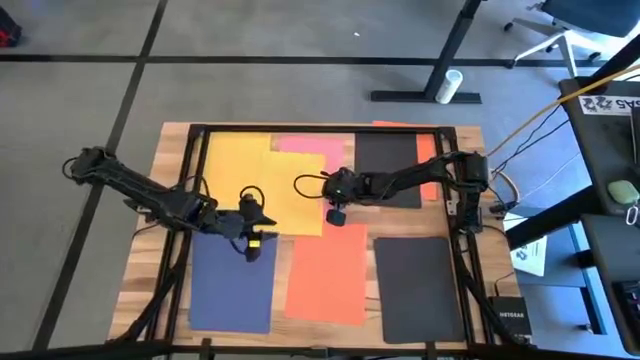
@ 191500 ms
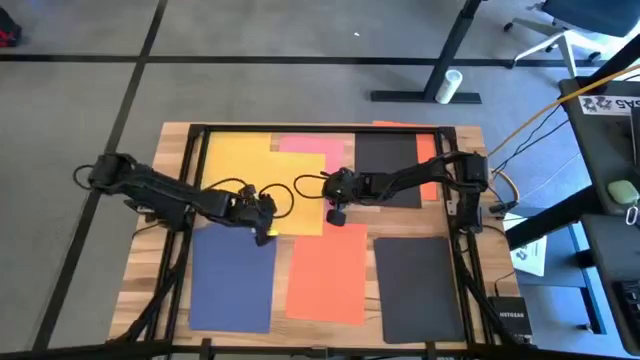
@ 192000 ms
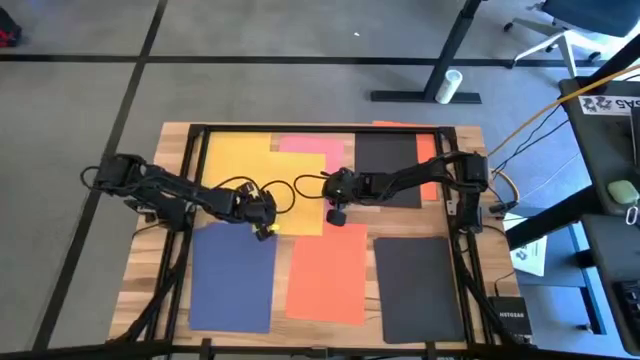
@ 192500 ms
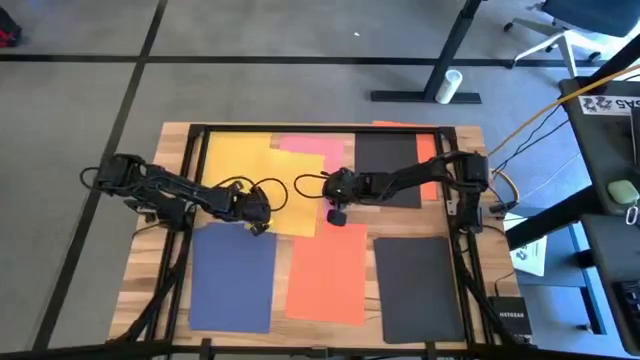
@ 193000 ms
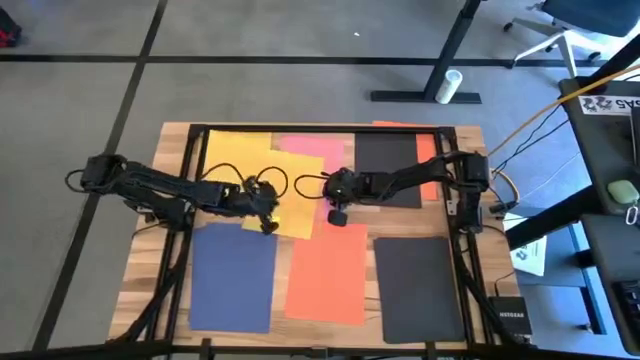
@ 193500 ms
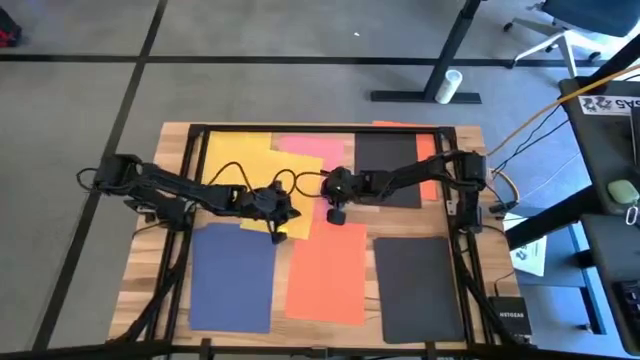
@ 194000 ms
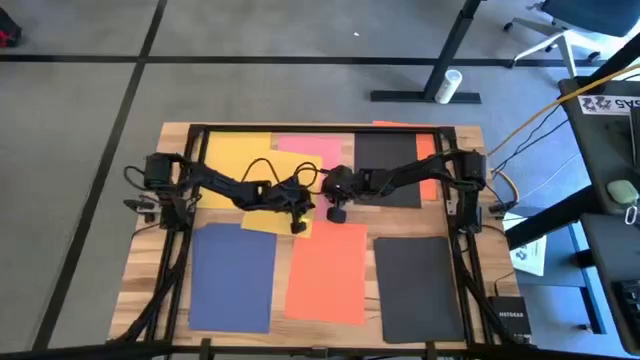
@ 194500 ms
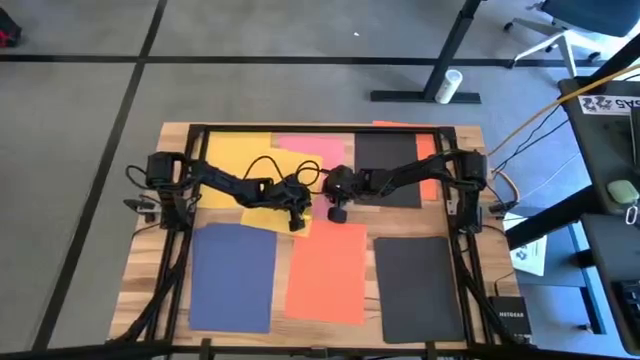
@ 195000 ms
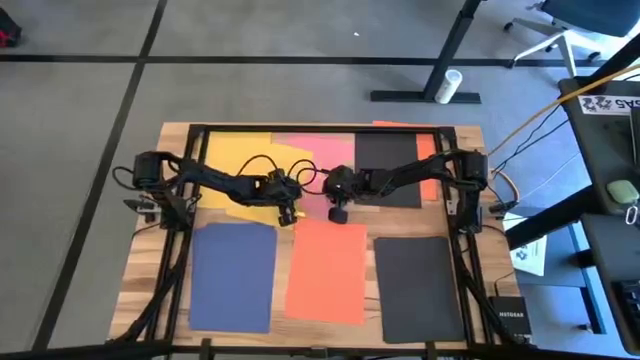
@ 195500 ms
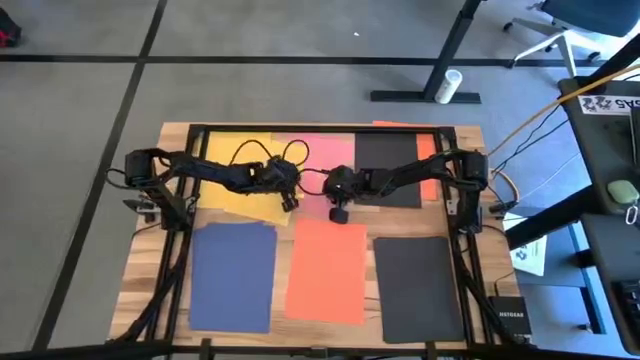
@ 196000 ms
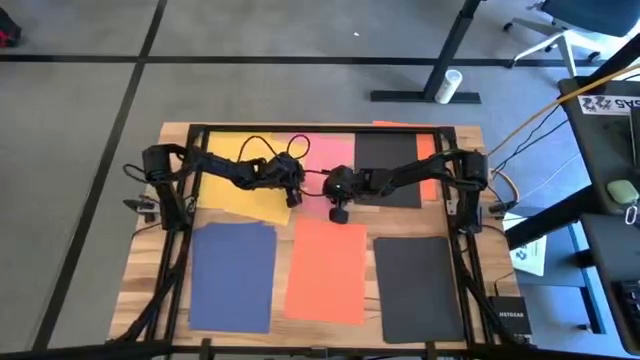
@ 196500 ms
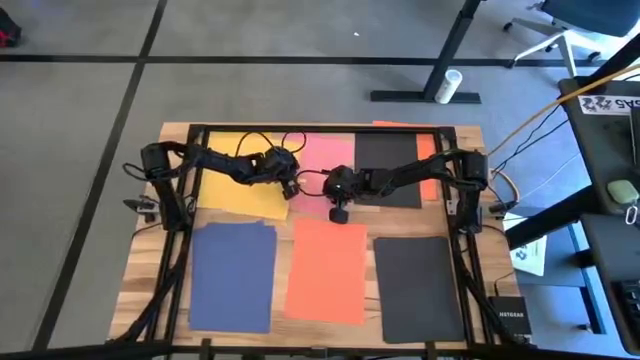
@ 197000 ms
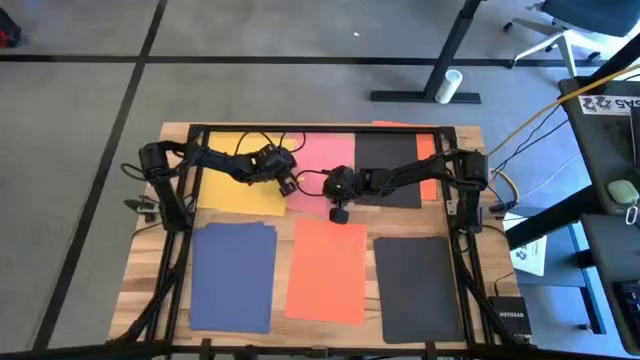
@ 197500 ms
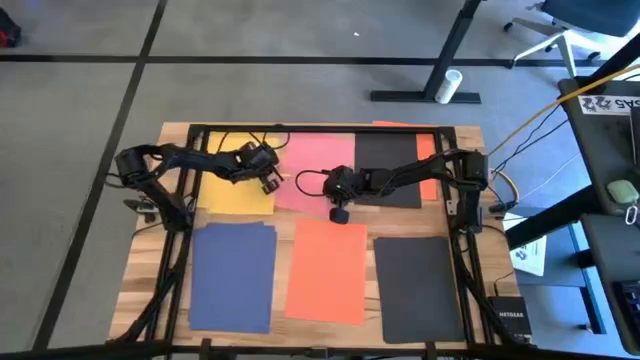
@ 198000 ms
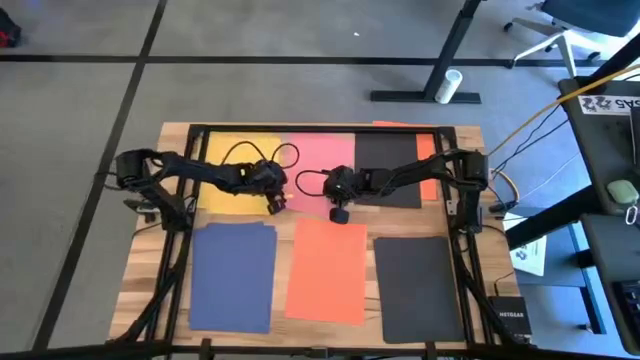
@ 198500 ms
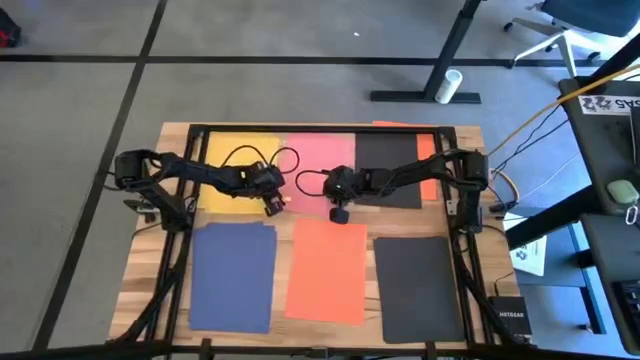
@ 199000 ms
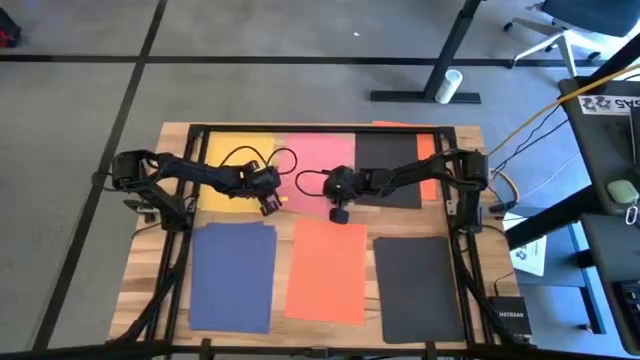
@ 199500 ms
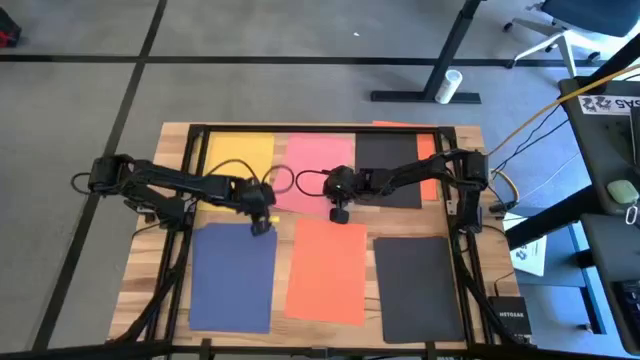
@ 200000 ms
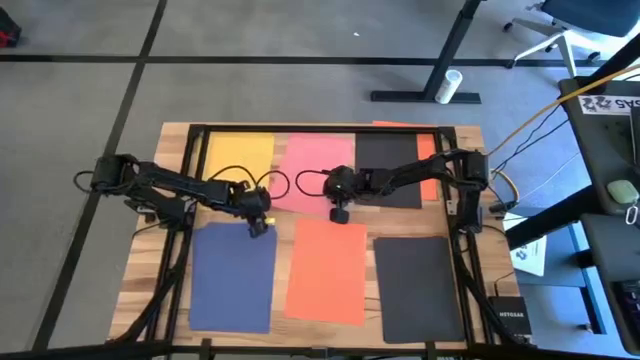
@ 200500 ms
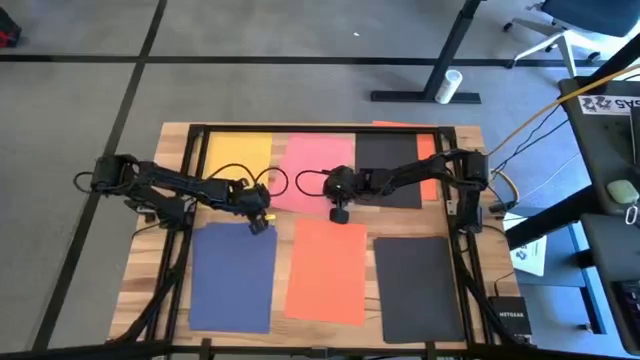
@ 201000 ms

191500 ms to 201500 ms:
Task: Organize paper
Stack the yellow paper on top of the stacked yellow papers

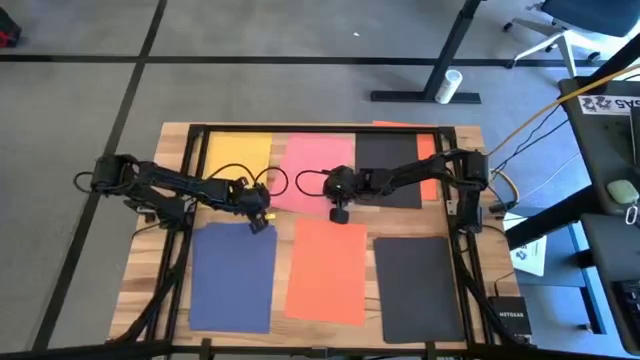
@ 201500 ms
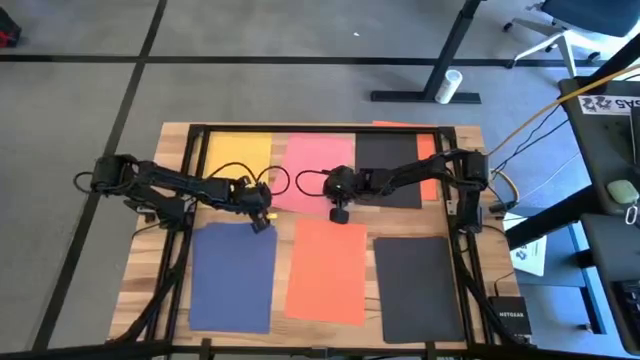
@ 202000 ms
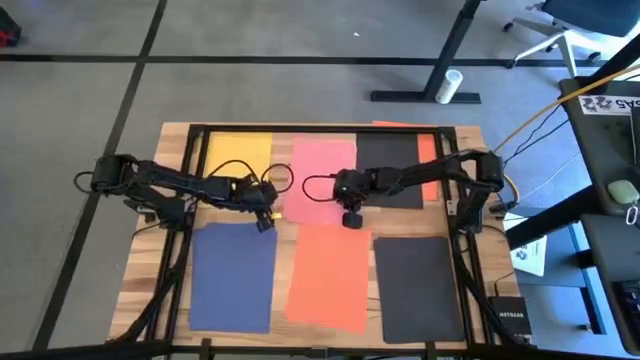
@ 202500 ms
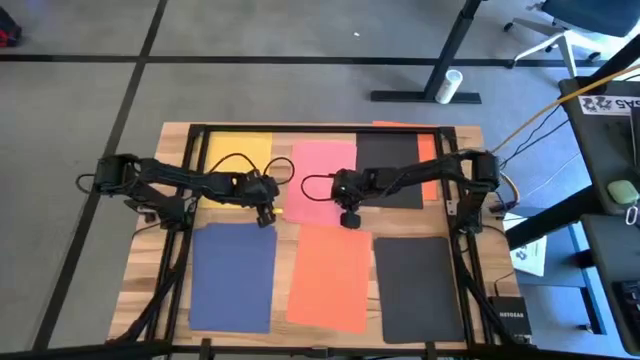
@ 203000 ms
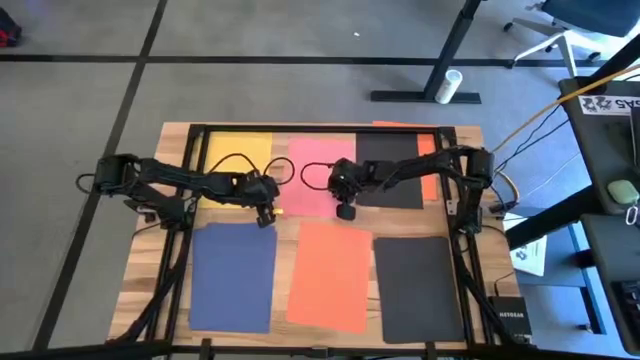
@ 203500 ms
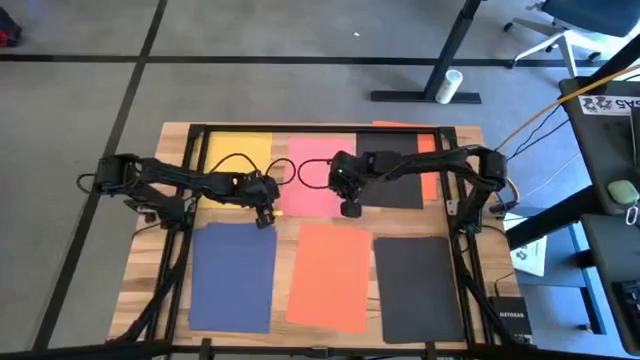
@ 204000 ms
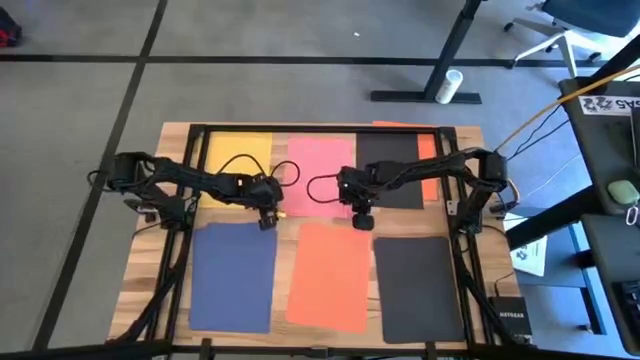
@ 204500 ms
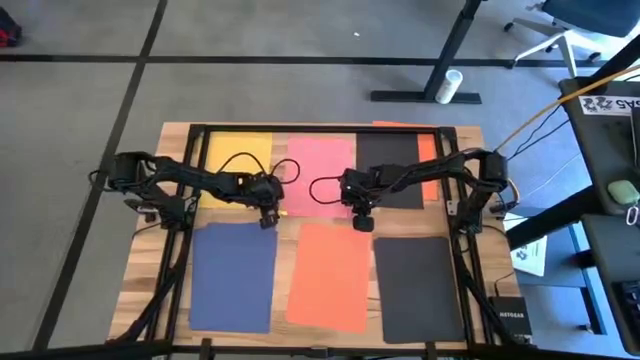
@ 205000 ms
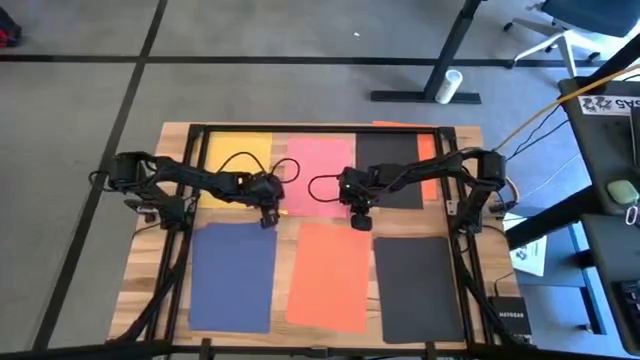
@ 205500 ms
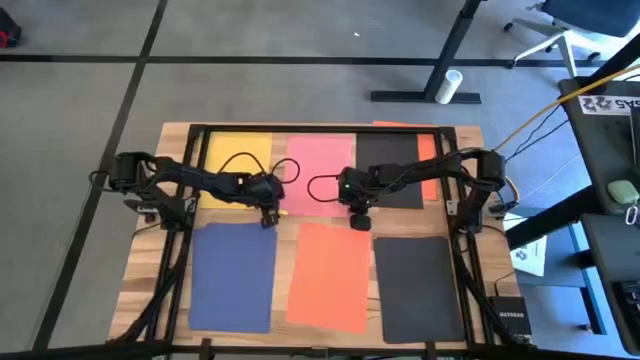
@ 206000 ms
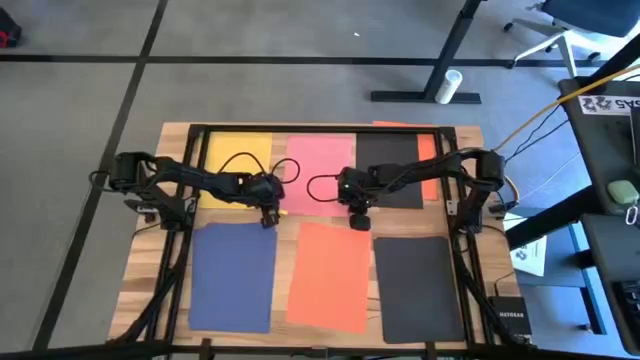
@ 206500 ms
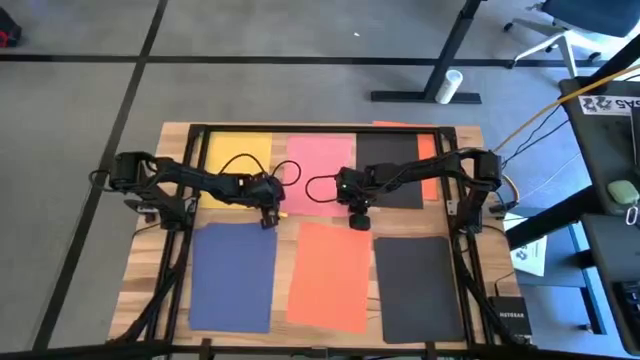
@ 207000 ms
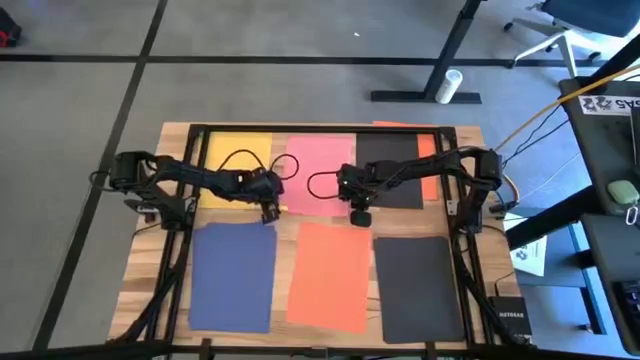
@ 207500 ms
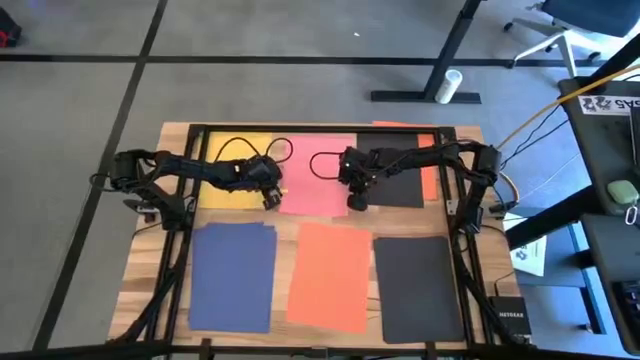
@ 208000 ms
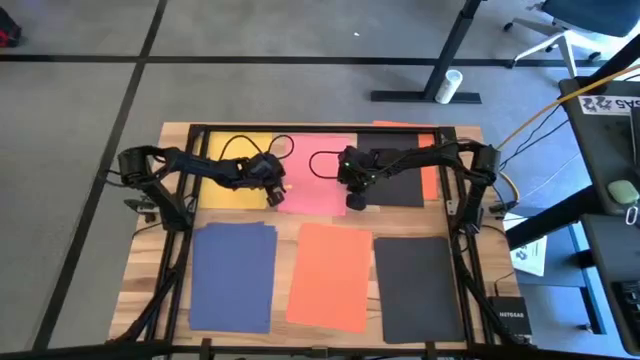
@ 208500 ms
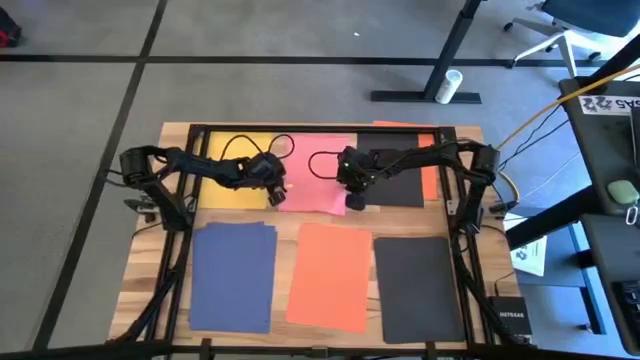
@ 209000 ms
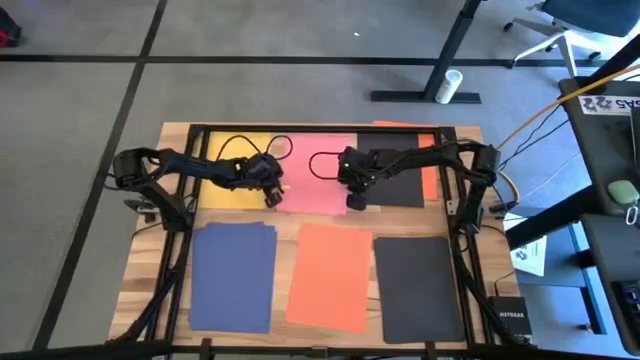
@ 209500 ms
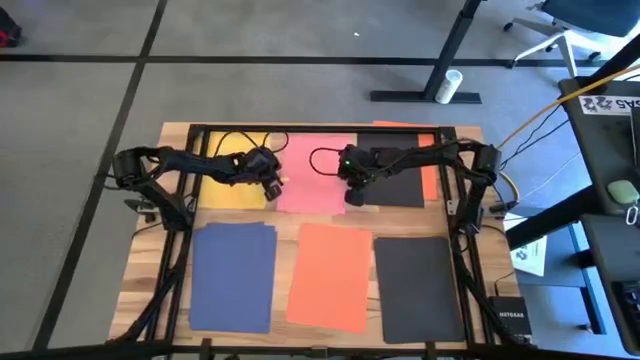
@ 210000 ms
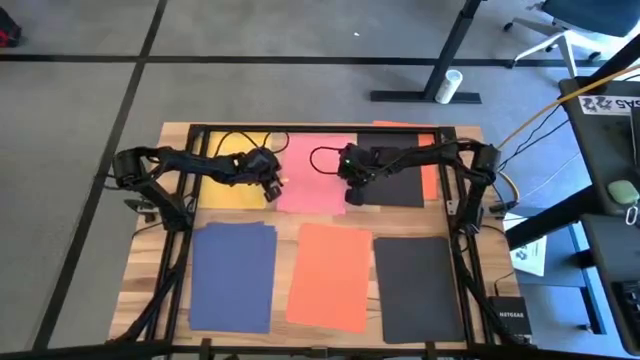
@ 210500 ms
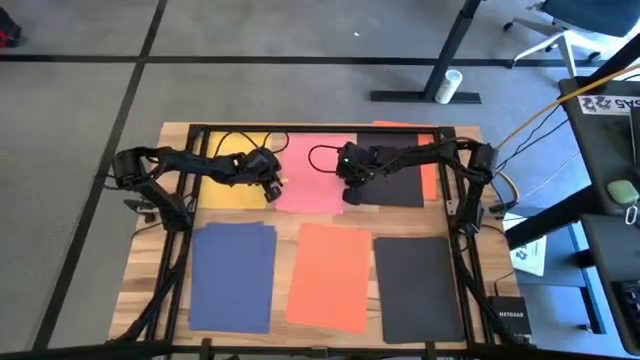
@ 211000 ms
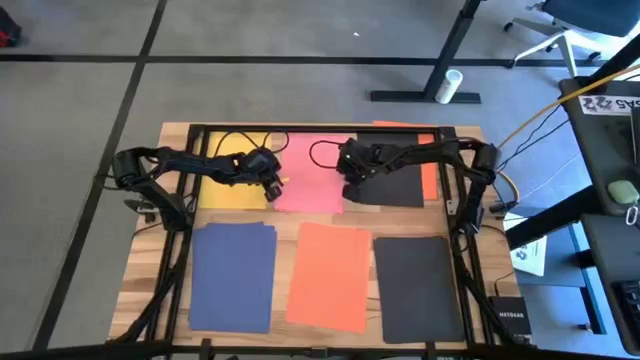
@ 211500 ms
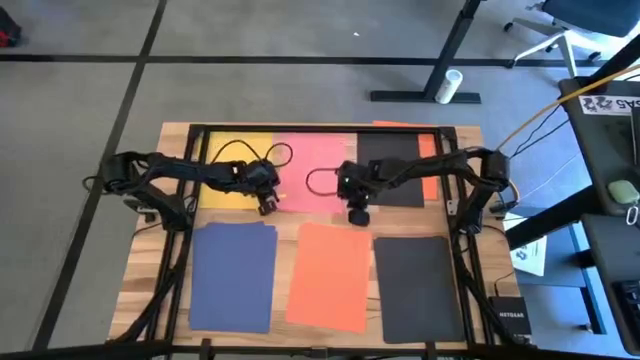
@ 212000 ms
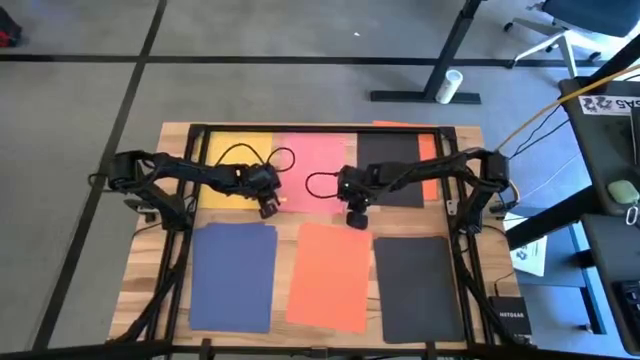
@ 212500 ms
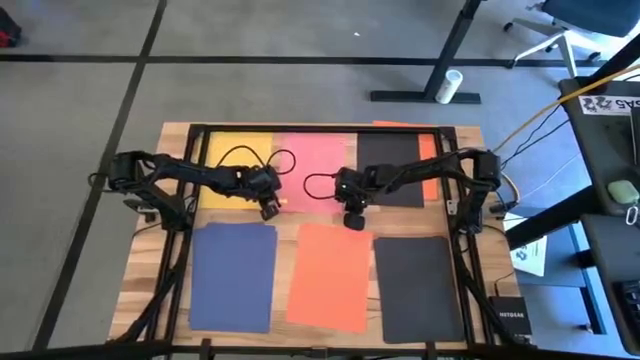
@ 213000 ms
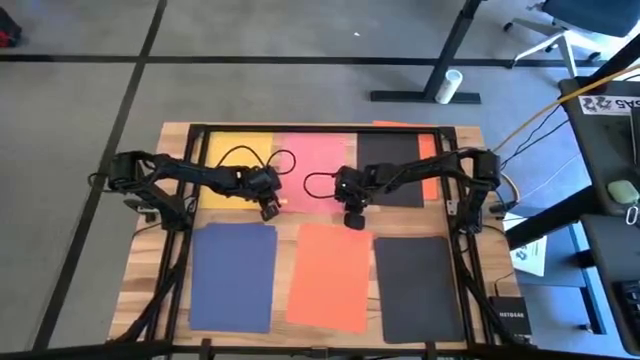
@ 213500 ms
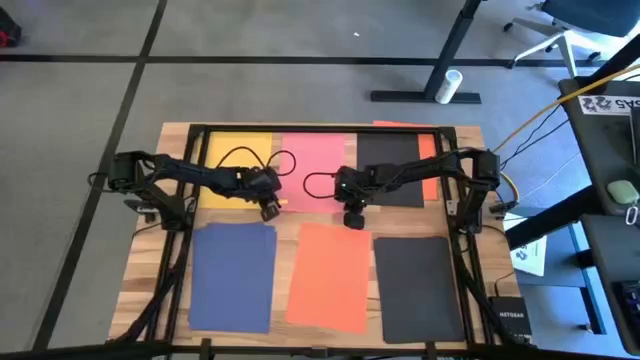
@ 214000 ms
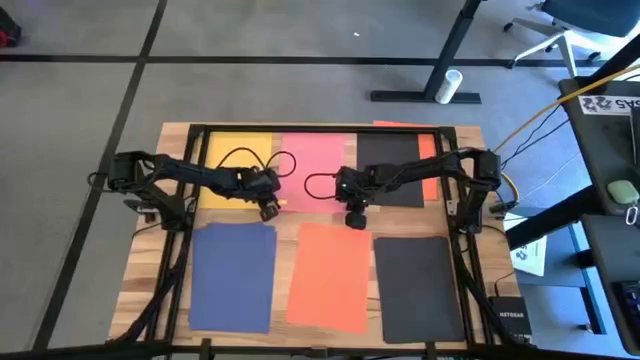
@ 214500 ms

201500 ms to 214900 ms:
Adjust the stacked pink papers on the table
